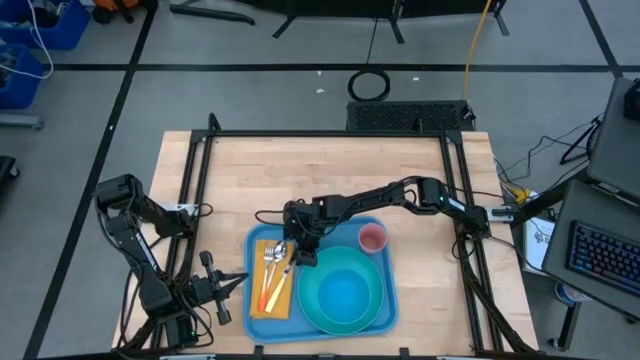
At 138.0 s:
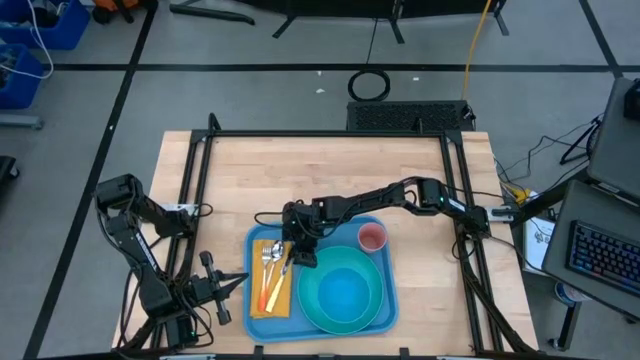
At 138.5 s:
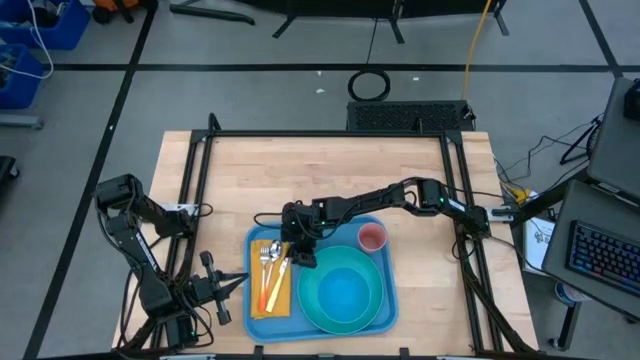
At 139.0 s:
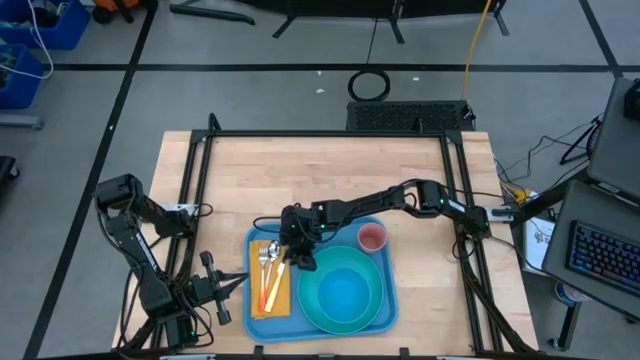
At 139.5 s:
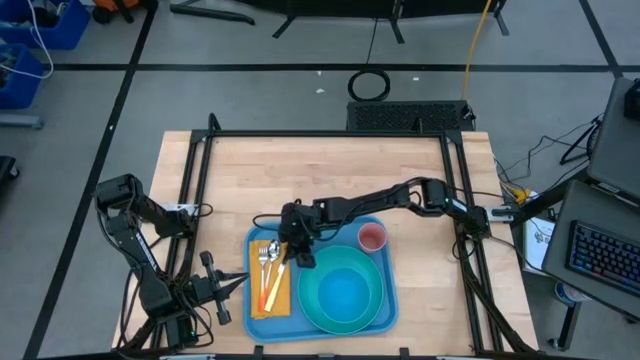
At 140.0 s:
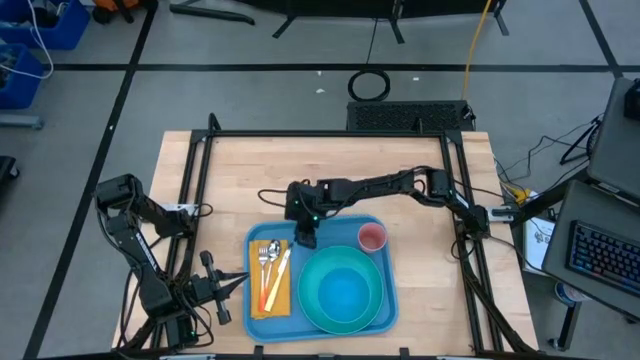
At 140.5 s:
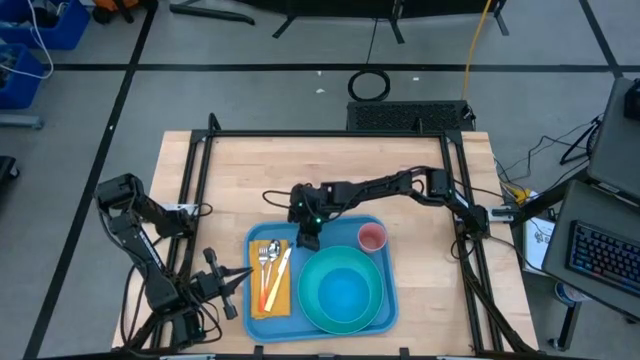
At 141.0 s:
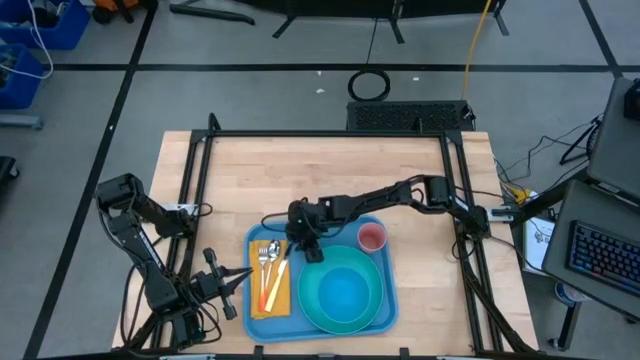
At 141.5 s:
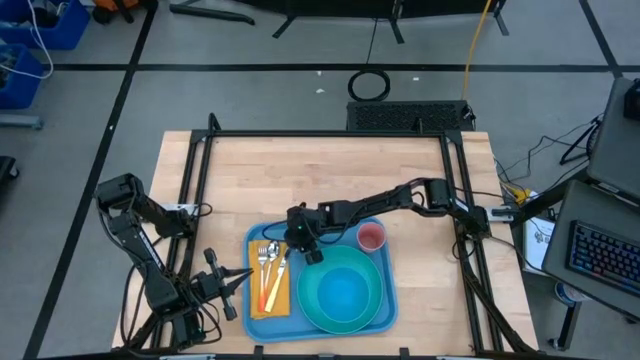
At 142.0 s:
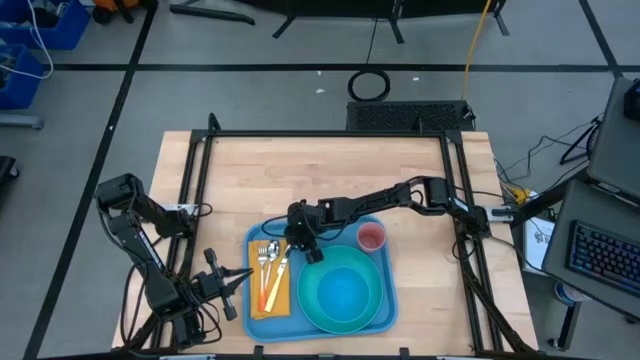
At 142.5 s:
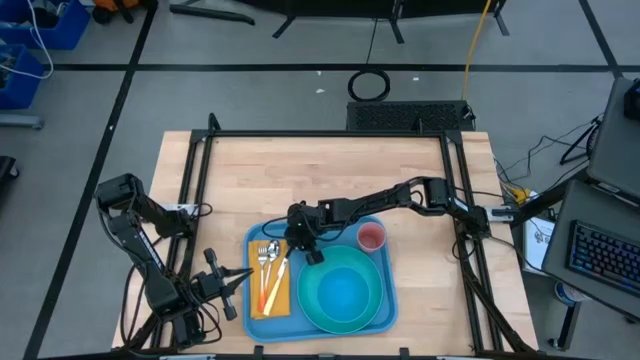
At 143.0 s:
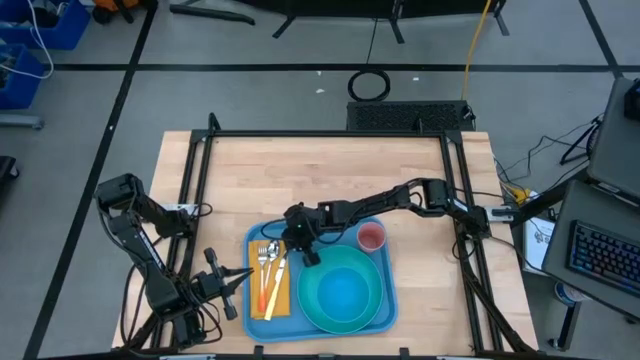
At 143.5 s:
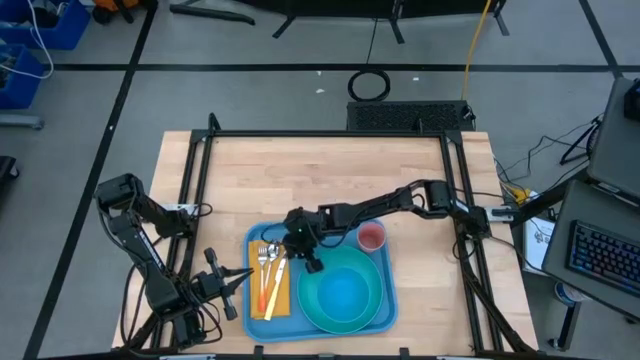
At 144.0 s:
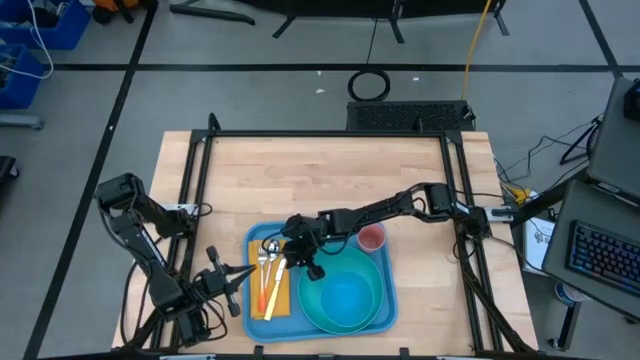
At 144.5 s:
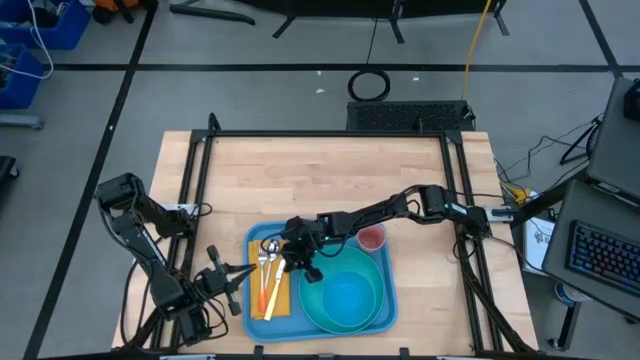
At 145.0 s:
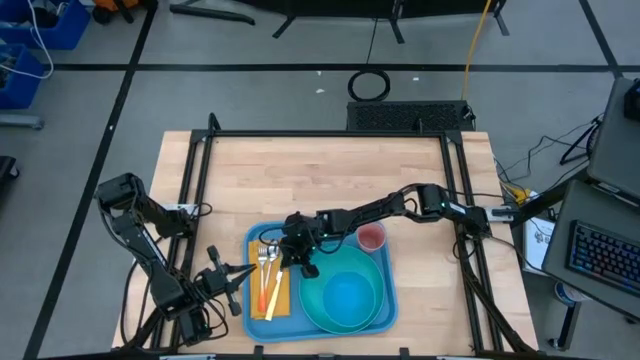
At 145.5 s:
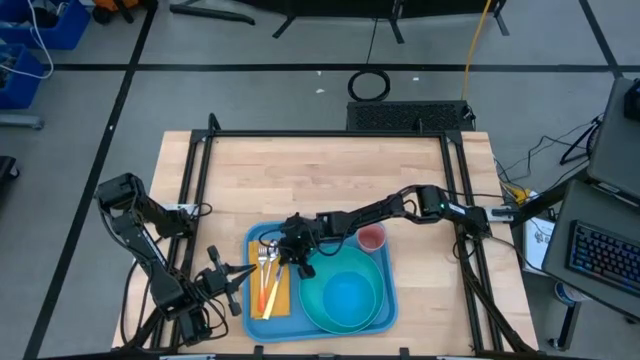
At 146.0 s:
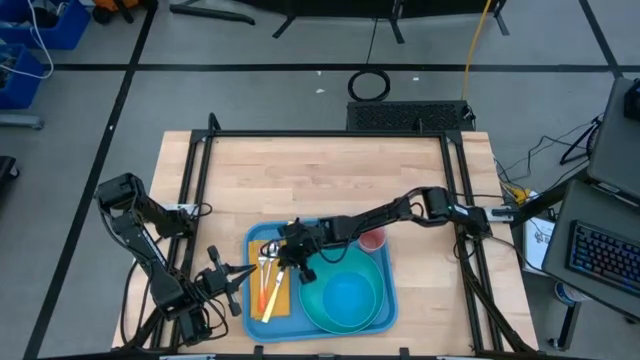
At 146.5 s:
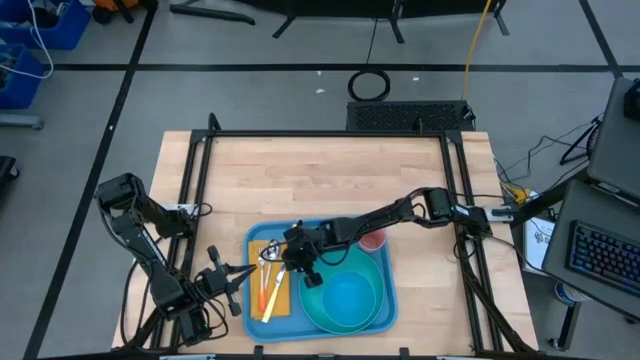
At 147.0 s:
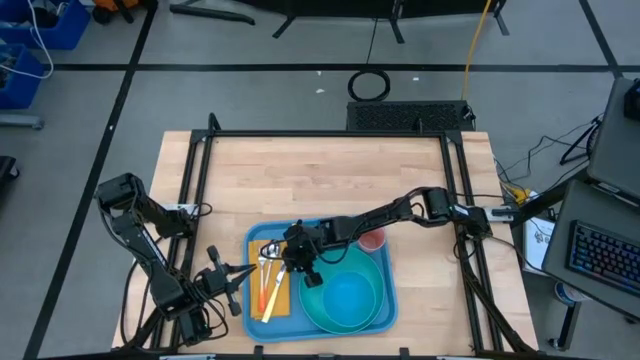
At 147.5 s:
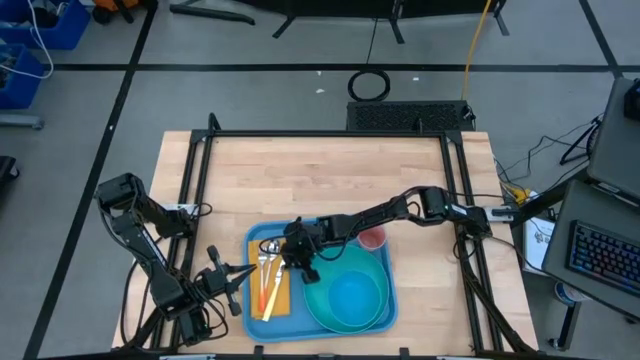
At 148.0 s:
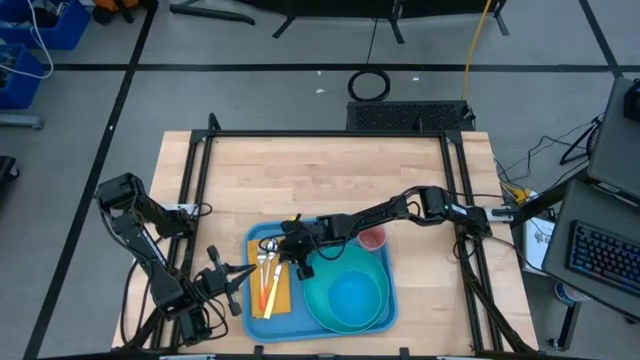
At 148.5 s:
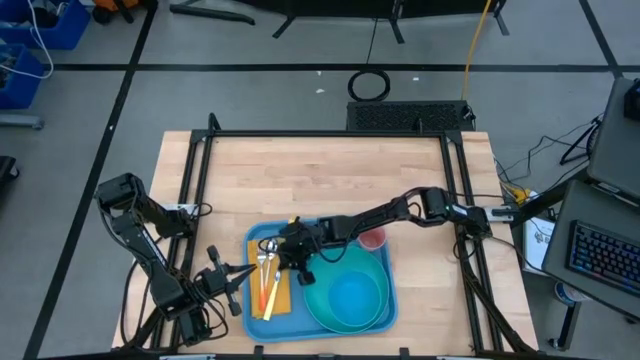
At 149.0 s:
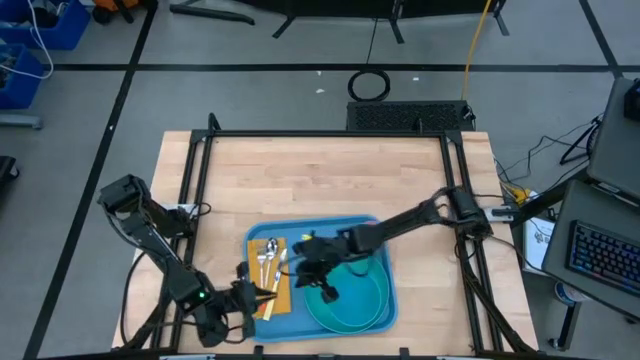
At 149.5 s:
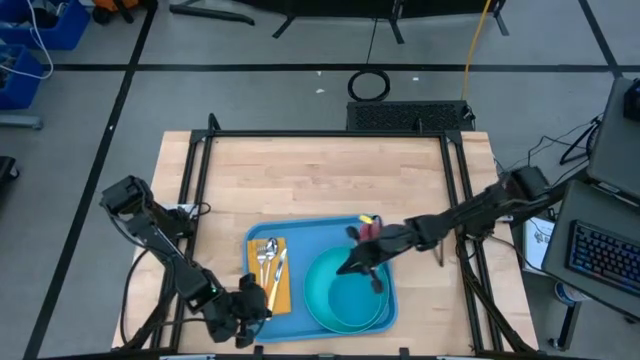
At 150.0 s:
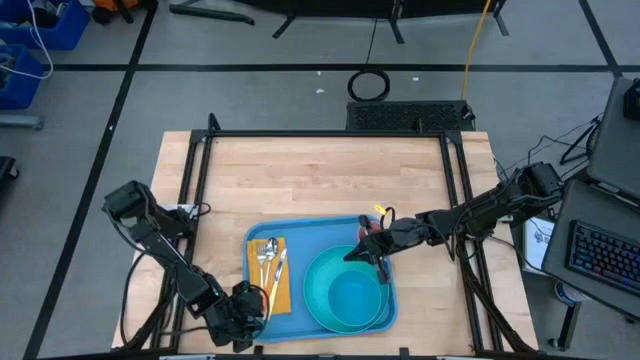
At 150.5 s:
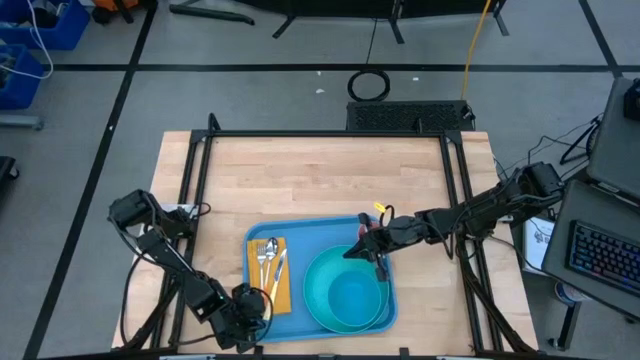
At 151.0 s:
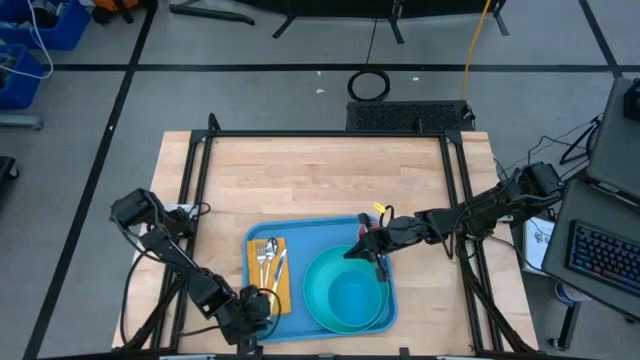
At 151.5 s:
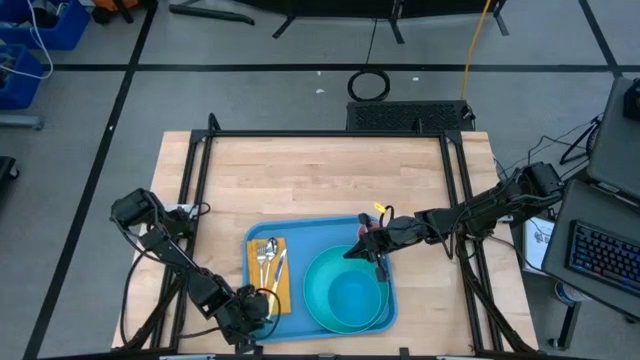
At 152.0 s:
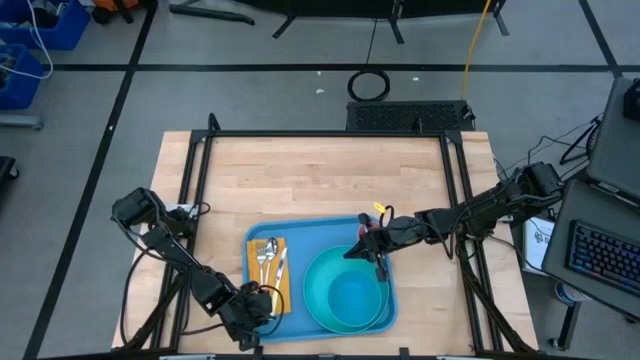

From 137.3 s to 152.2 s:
Task: Set up tray
Adjust the white table knife on the top of the yellow table napkin

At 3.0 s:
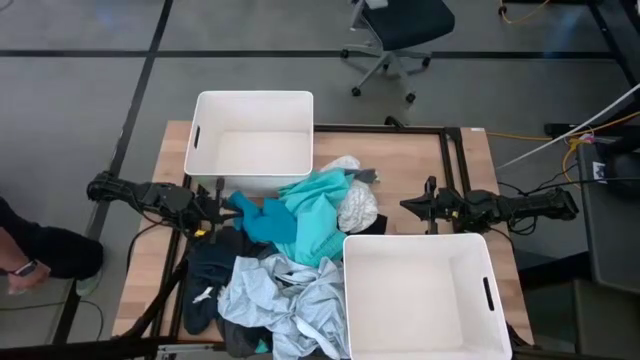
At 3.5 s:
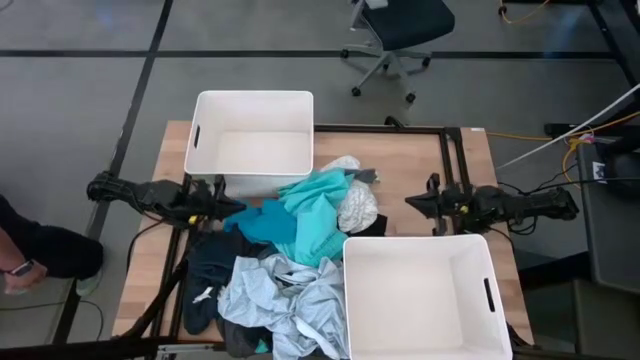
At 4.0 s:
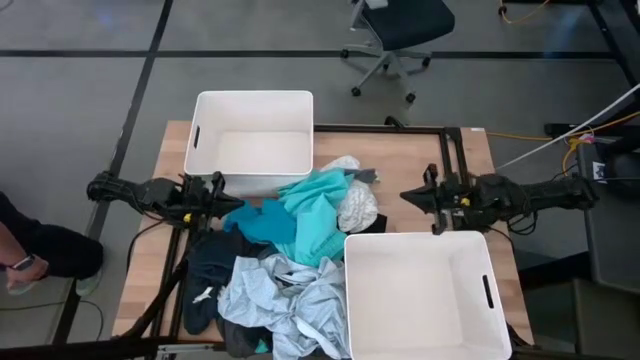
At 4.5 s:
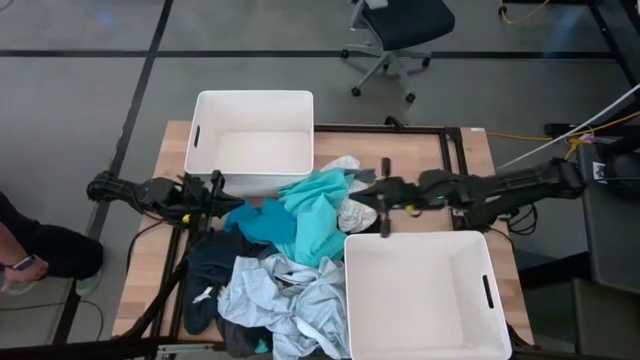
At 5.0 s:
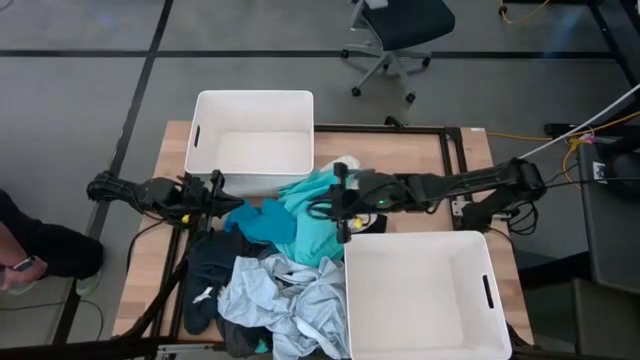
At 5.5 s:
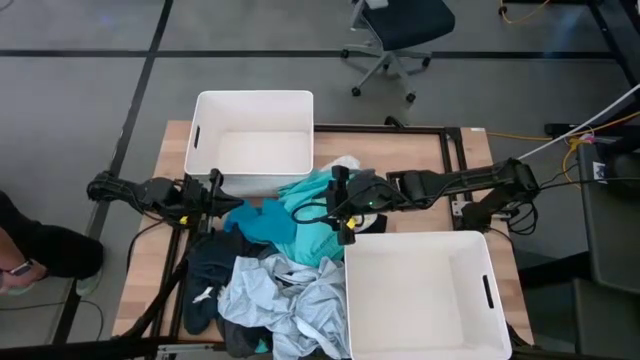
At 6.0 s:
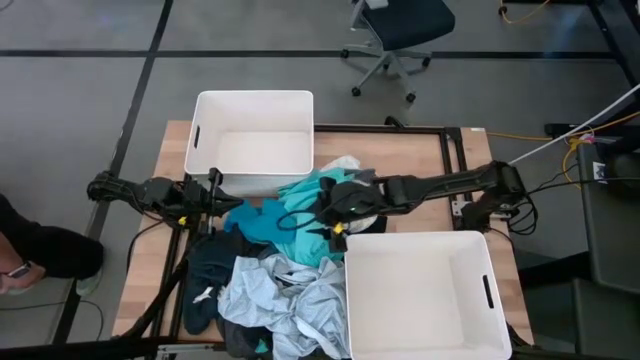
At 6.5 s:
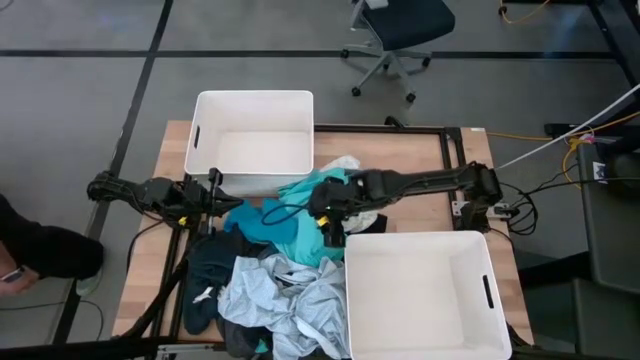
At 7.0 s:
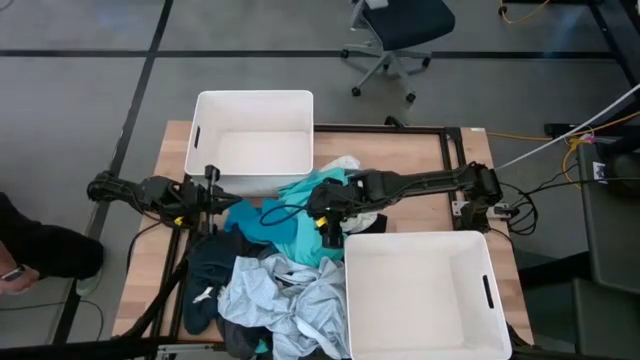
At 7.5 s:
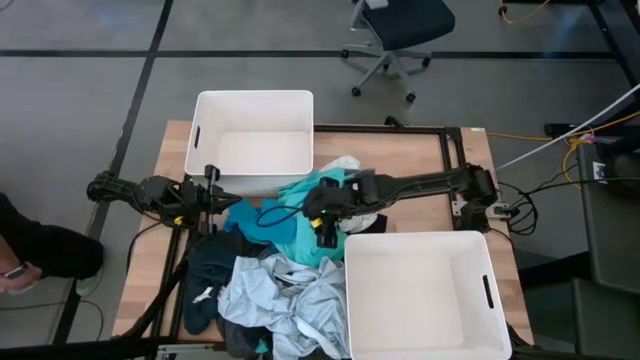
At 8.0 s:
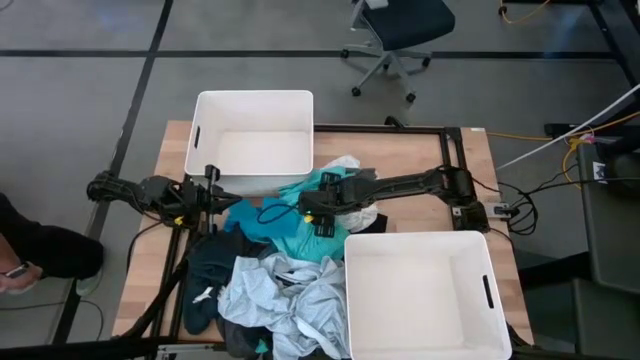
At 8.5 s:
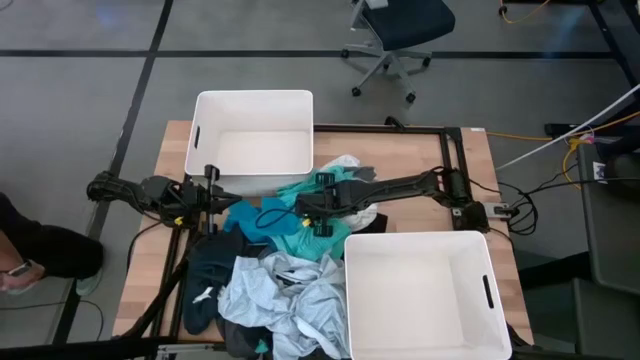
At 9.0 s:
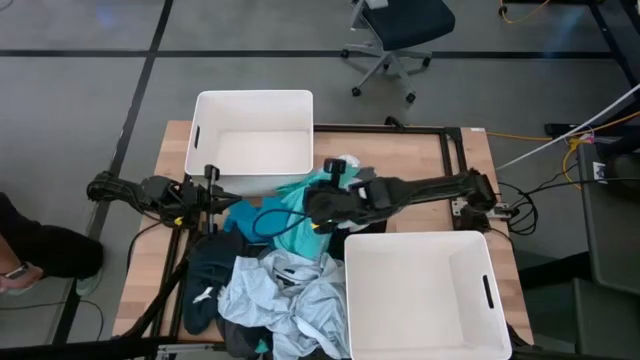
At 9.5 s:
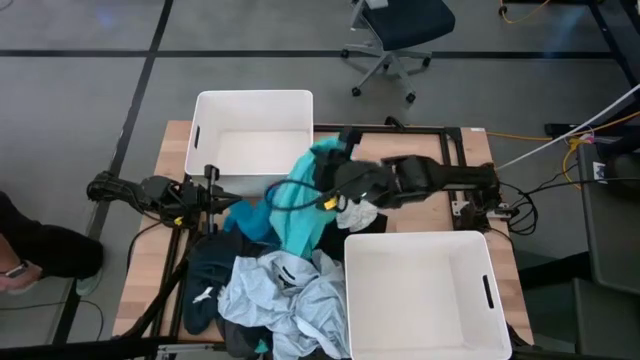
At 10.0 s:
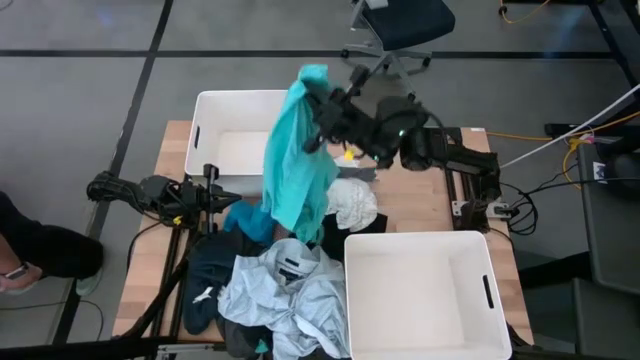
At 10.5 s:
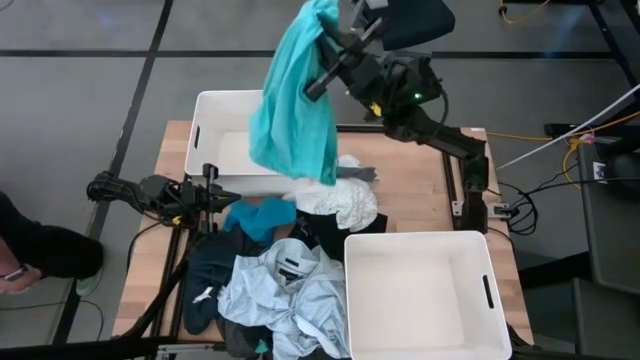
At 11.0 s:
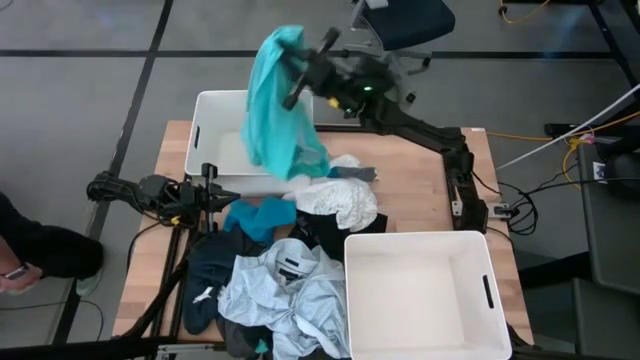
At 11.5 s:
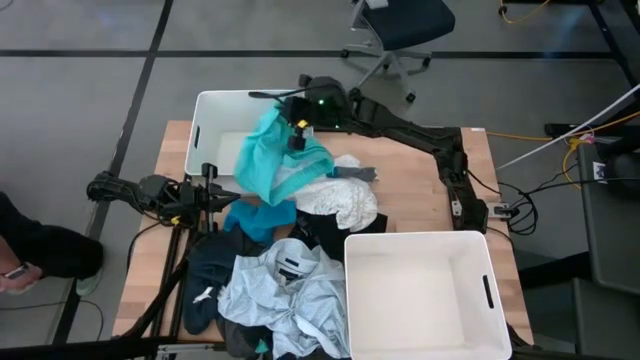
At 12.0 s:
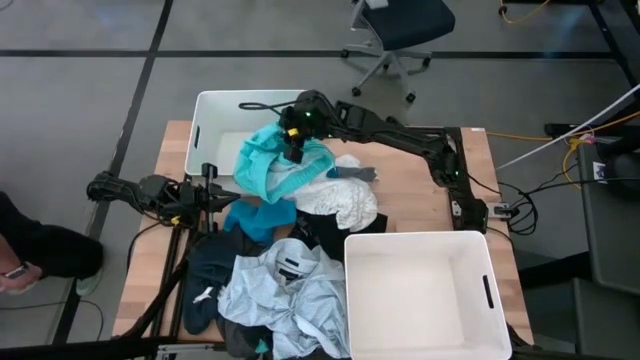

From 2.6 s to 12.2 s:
Task: Sort clothes
Put the light blue shorts into the top white laundry bin
